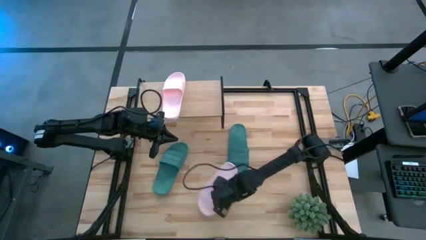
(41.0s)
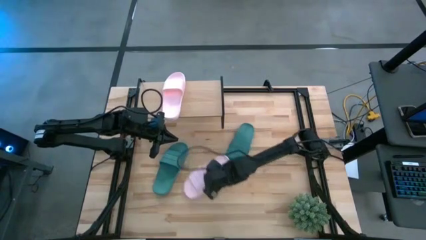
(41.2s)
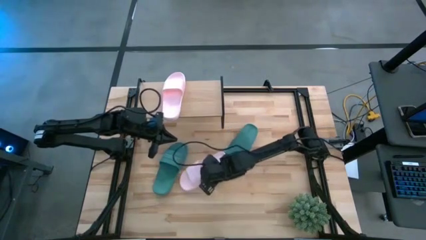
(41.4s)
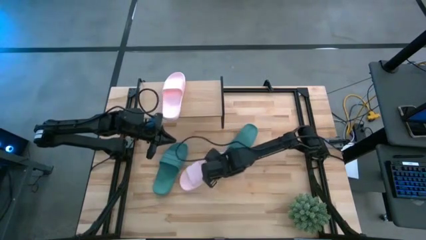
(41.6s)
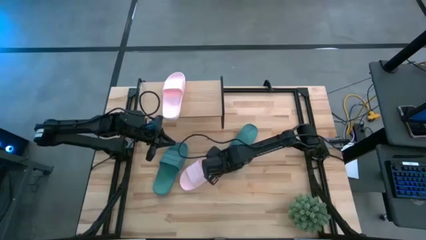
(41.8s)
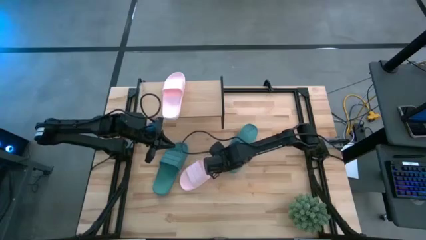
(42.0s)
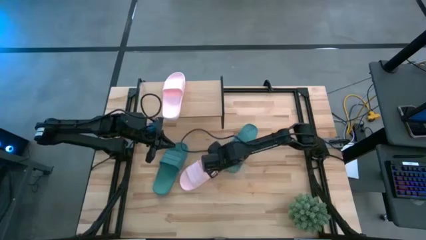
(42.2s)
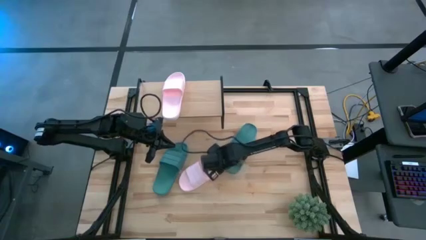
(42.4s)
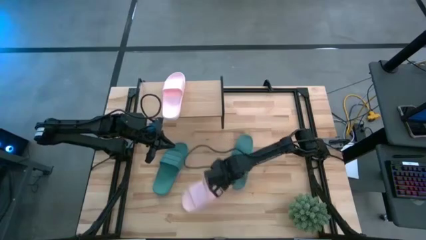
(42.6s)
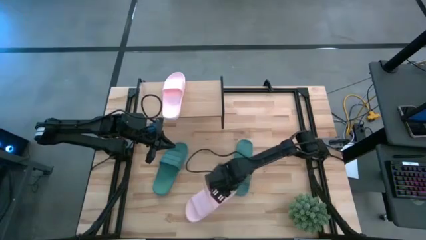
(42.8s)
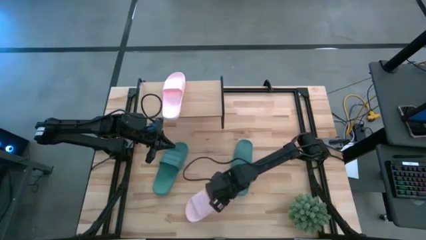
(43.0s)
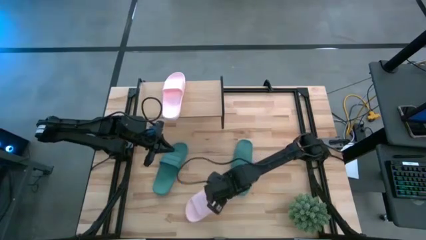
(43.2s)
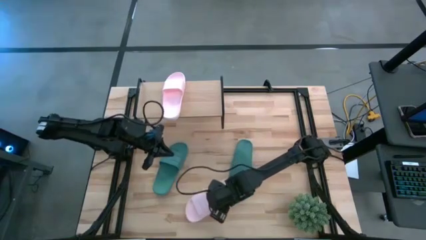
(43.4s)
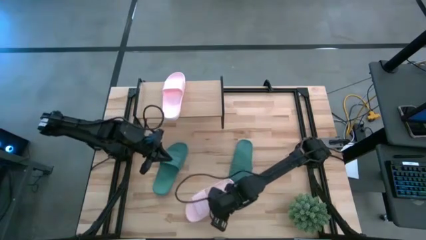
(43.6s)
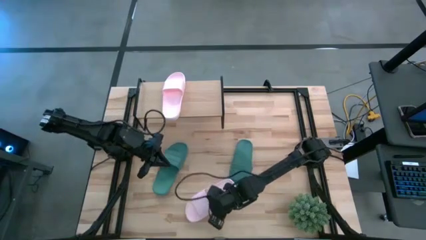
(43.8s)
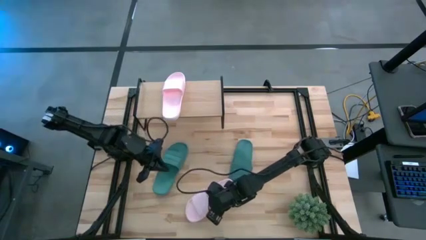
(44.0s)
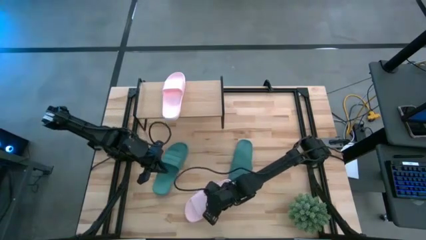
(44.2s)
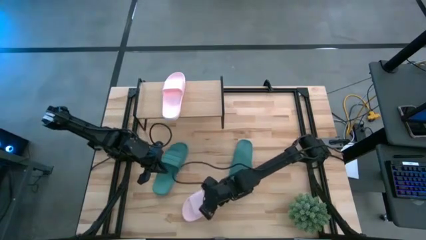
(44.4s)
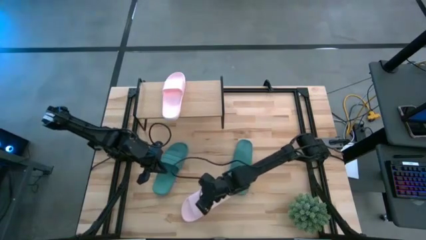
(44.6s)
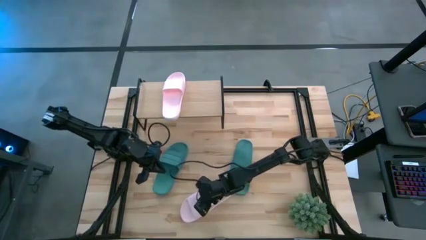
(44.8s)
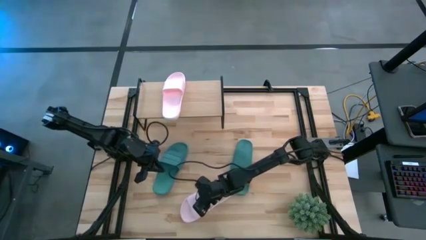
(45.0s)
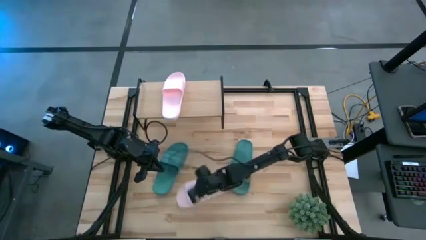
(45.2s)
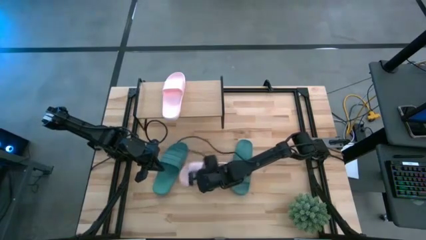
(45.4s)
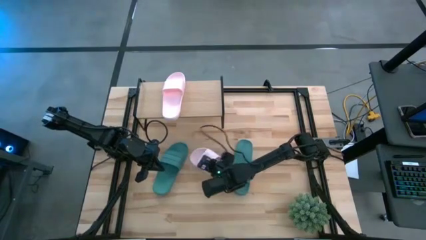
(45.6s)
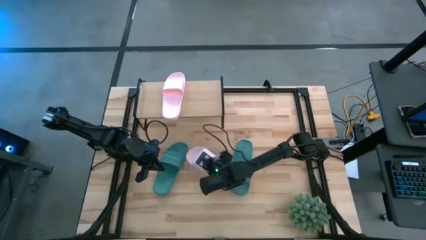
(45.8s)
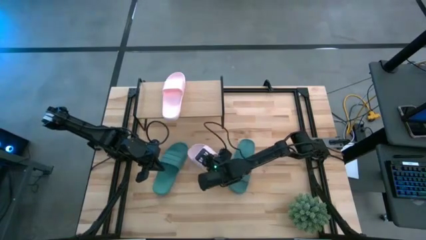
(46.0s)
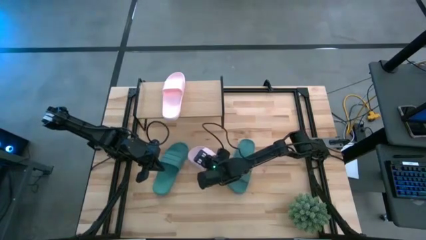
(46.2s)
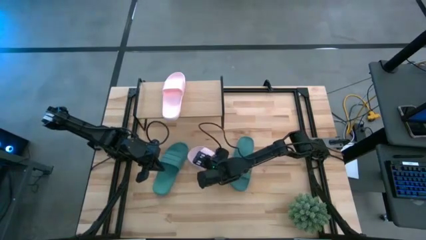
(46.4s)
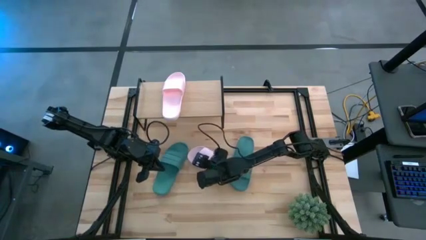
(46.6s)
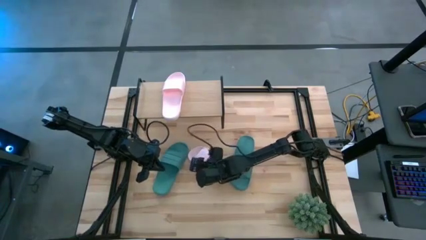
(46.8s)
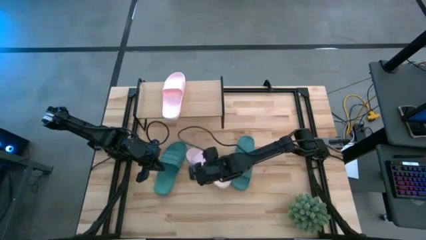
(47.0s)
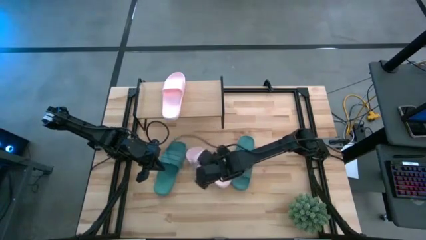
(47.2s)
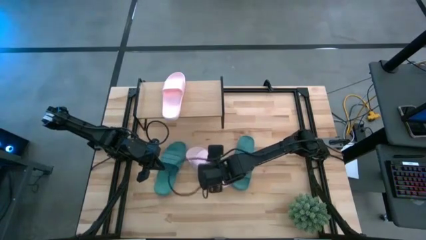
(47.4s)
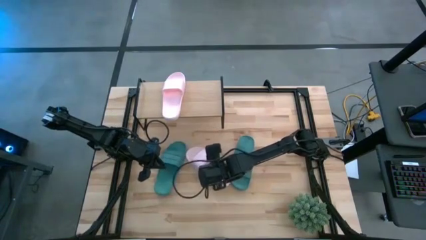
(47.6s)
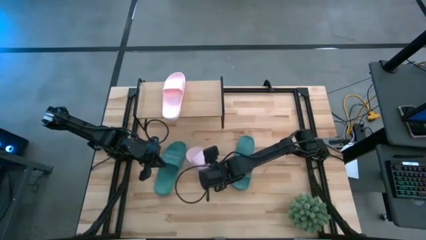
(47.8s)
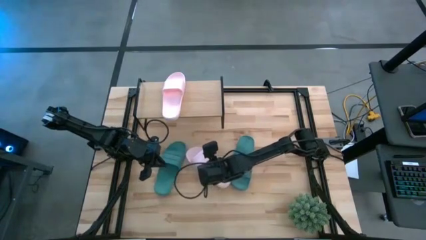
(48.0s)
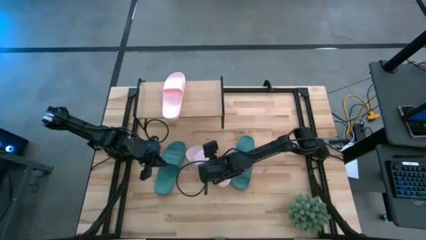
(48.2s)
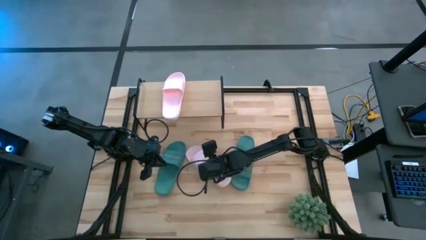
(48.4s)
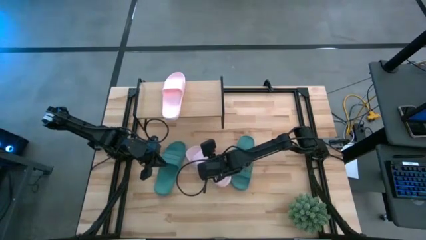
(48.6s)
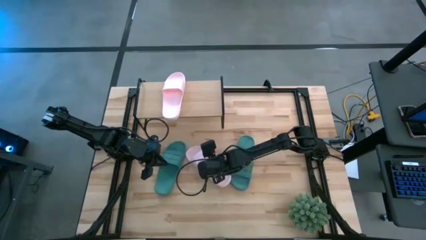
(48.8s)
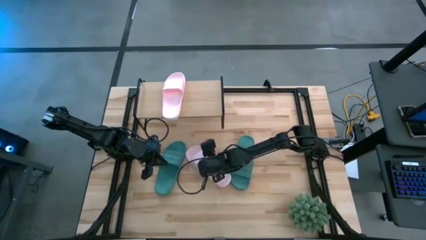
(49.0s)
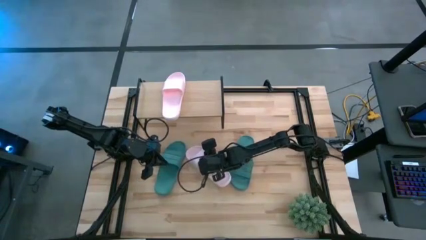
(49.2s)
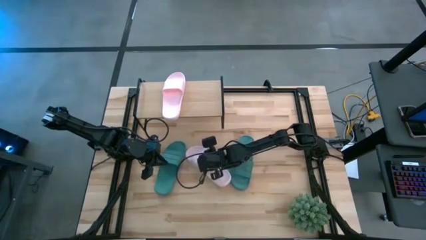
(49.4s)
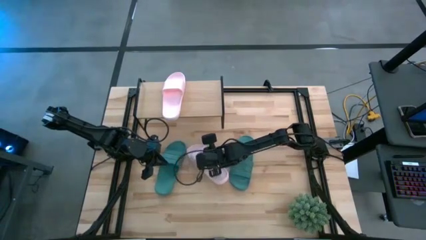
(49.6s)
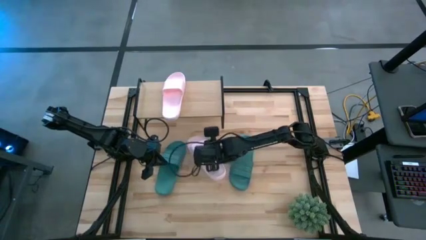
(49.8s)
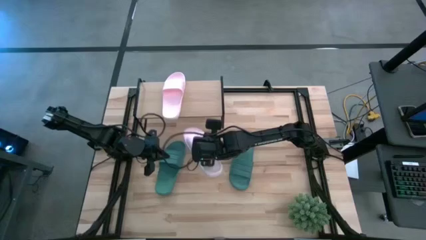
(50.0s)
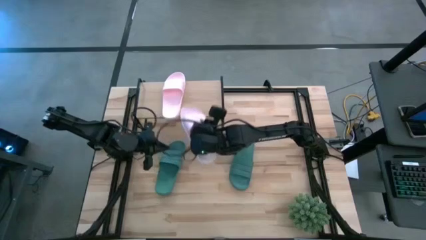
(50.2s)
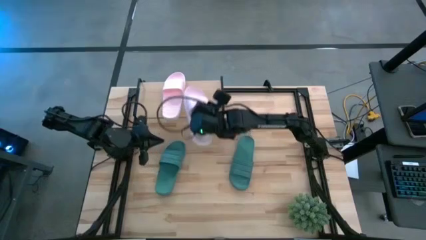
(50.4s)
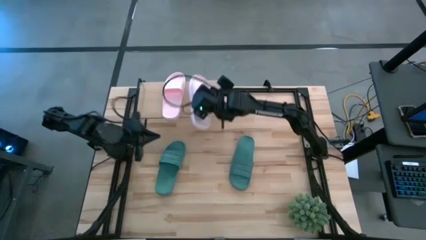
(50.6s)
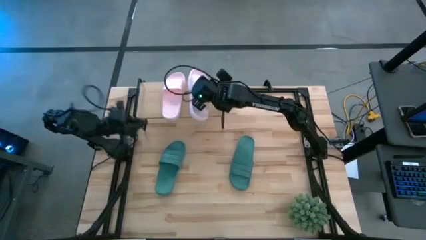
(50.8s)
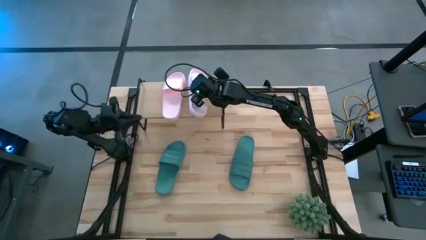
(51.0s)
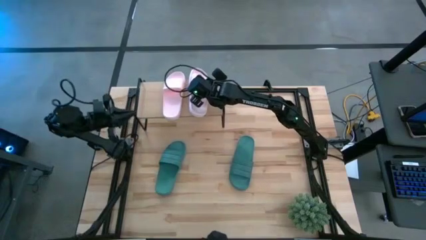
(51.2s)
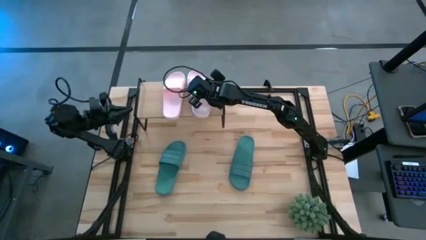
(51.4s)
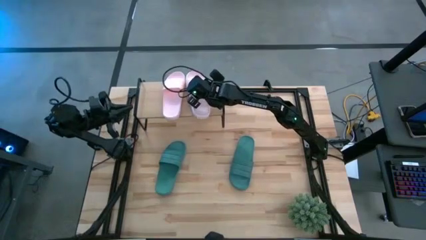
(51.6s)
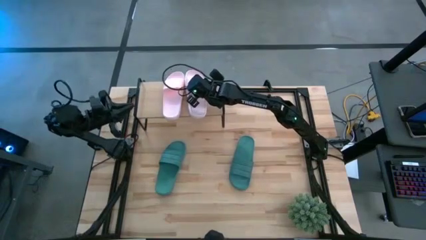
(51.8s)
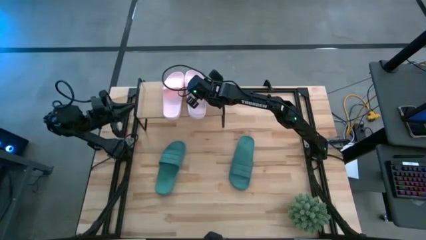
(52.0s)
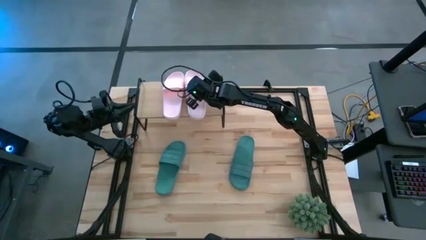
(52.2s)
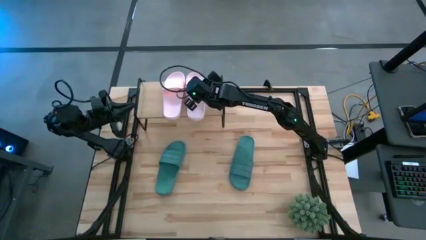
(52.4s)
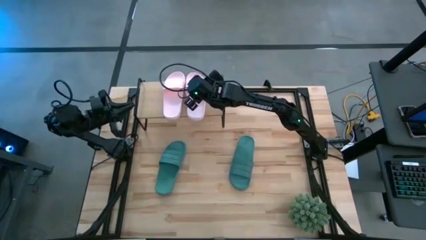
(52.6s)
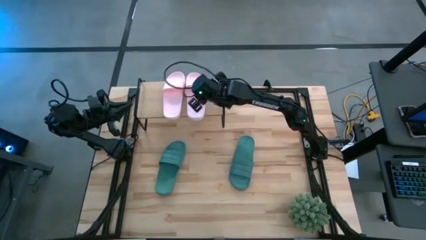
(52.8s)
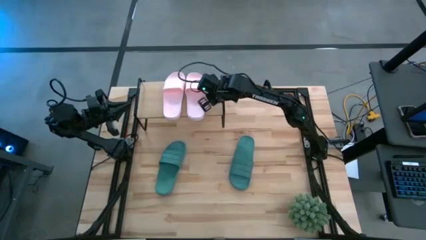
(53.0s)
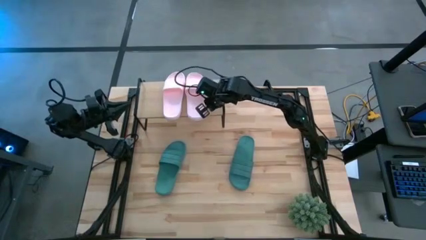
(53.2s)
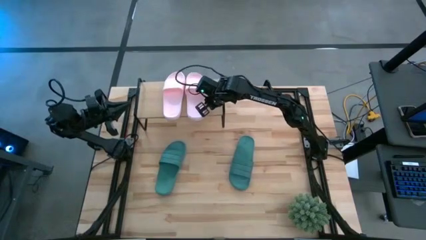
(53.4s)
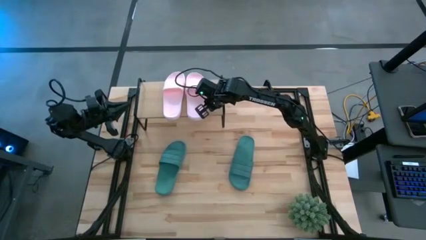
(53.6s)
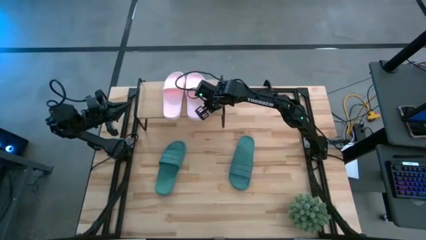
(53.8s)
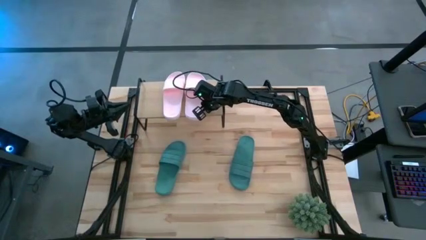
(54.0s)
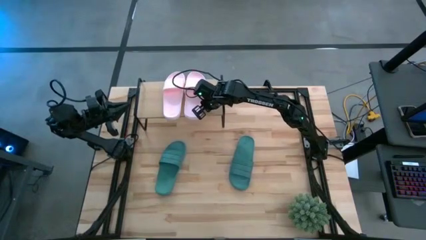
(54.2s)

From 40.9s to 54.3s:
Task: Pick and place slides into the shelf
Put the pink slide on the shelf
